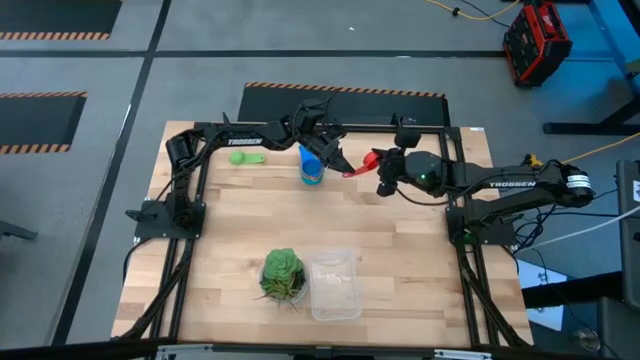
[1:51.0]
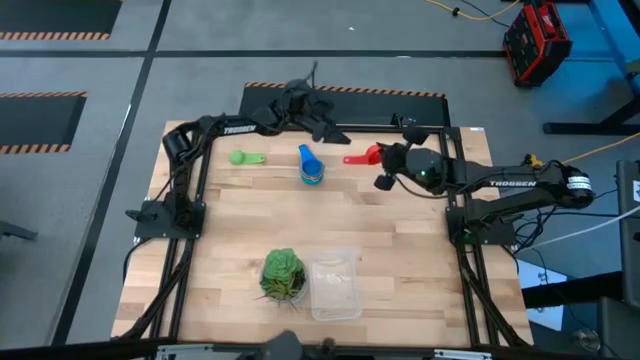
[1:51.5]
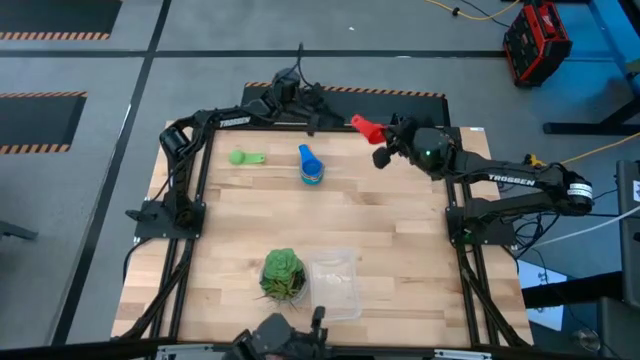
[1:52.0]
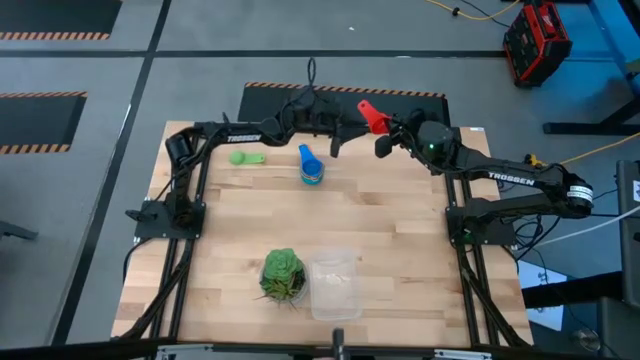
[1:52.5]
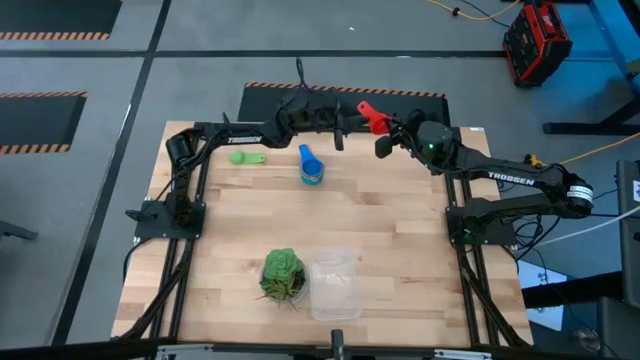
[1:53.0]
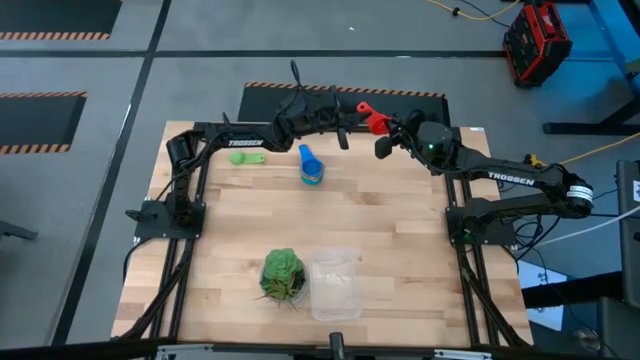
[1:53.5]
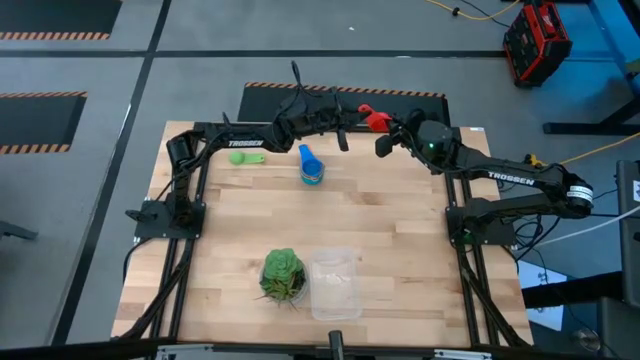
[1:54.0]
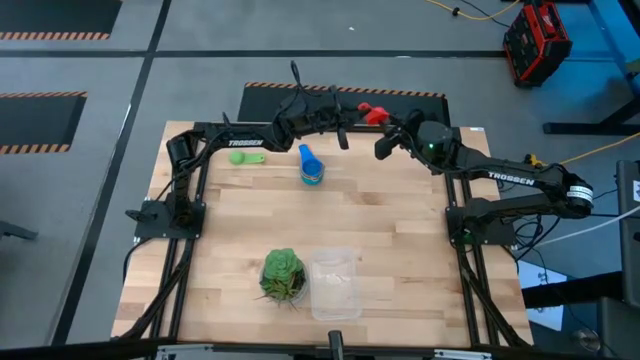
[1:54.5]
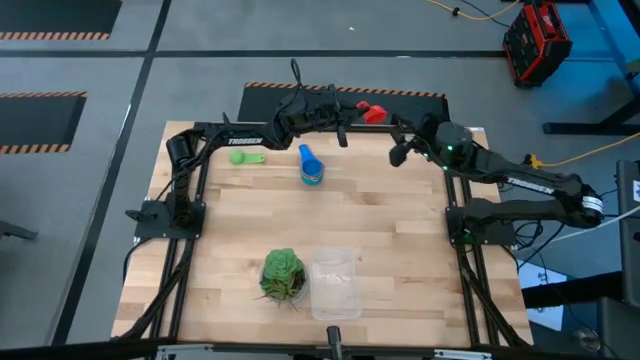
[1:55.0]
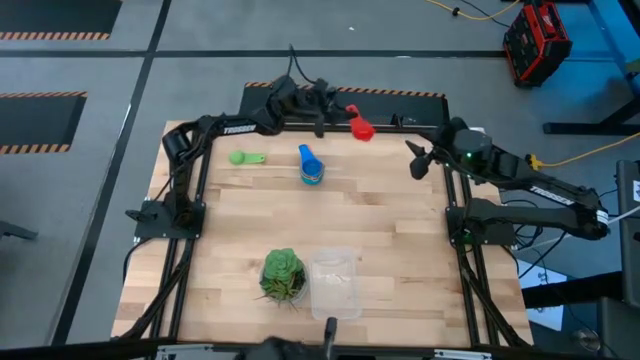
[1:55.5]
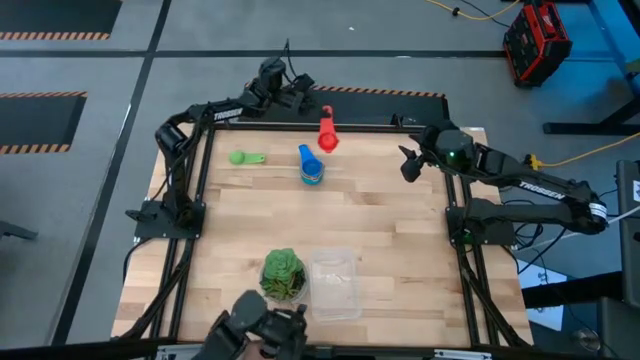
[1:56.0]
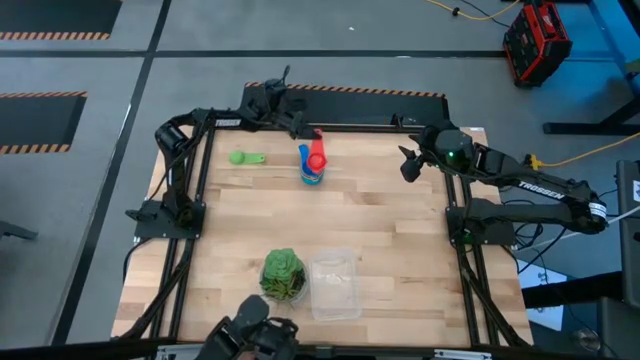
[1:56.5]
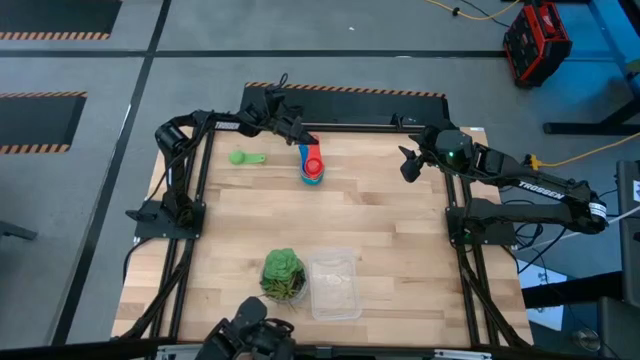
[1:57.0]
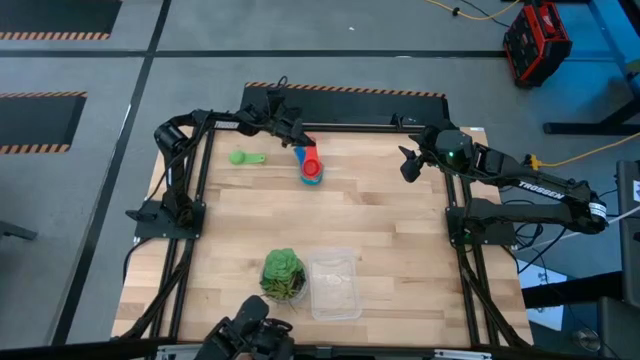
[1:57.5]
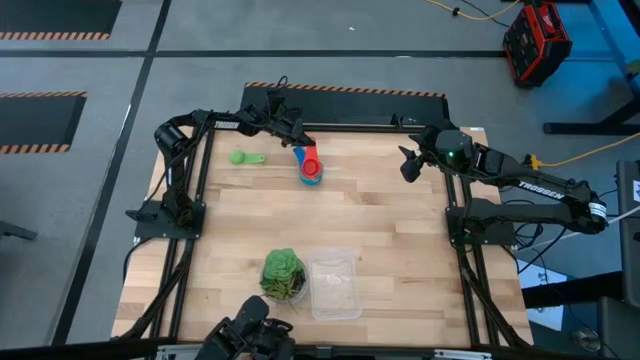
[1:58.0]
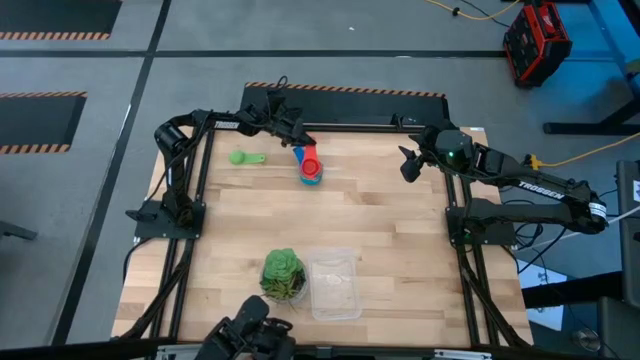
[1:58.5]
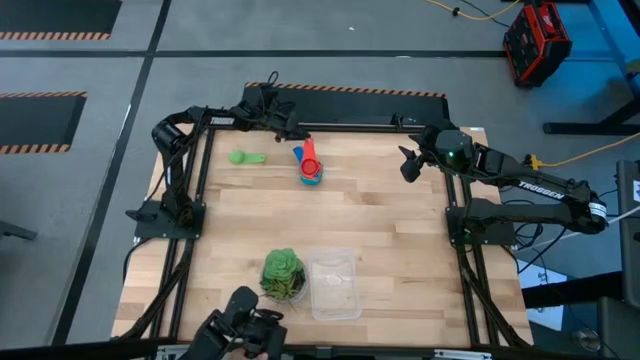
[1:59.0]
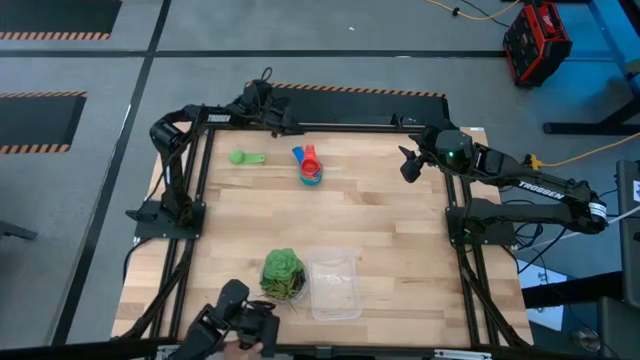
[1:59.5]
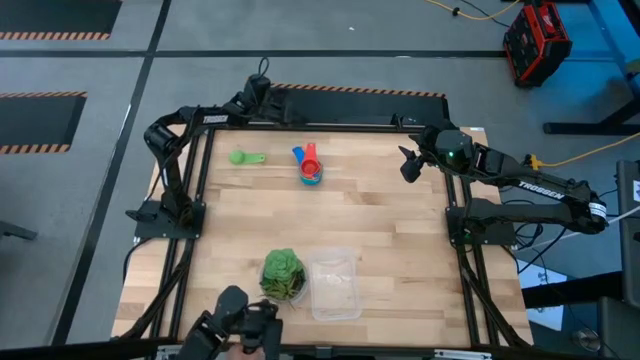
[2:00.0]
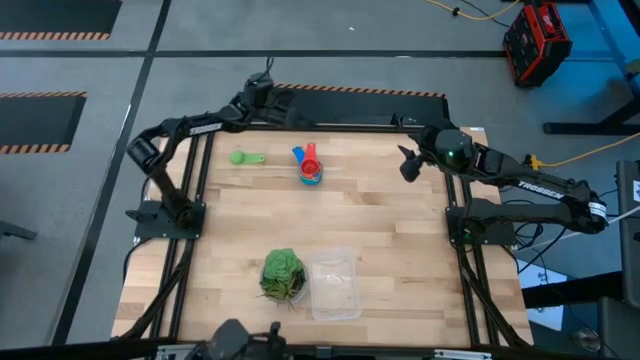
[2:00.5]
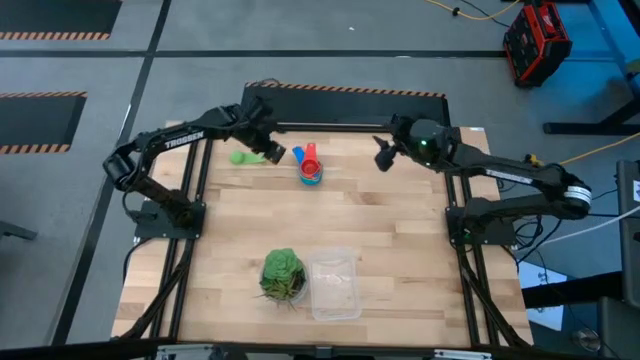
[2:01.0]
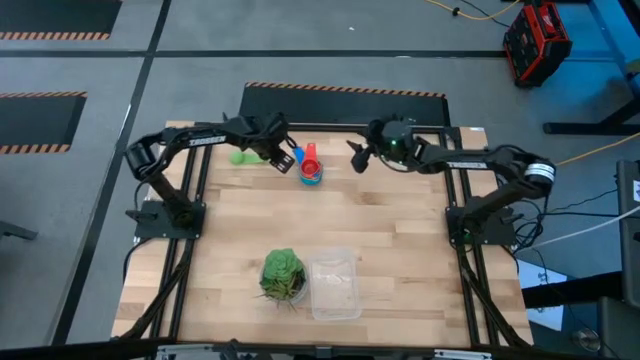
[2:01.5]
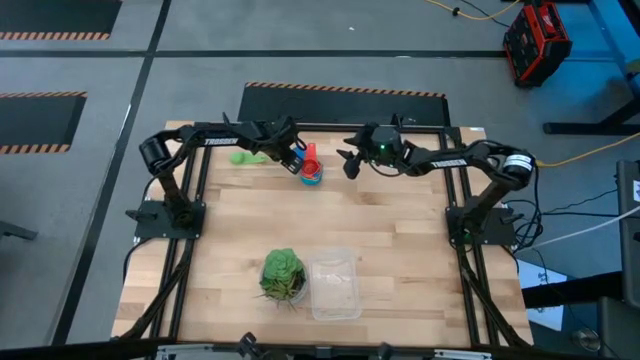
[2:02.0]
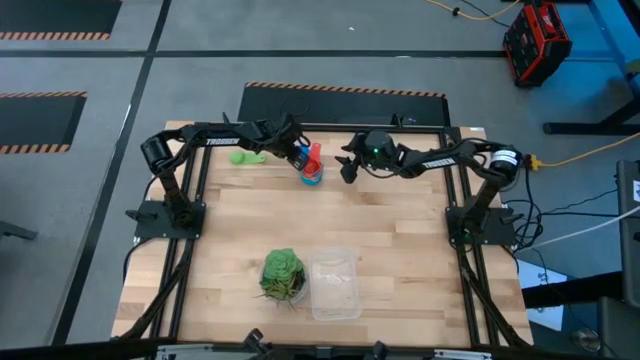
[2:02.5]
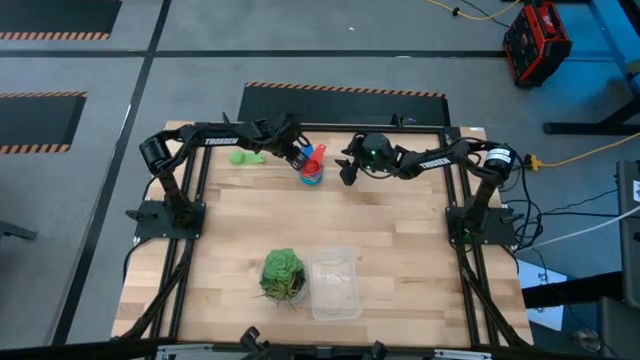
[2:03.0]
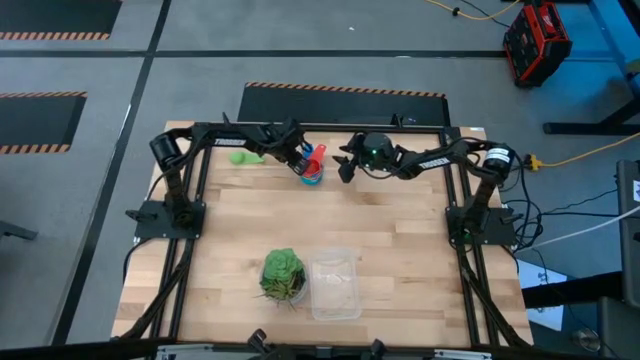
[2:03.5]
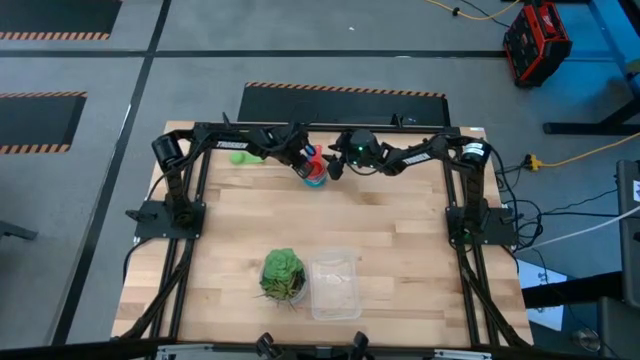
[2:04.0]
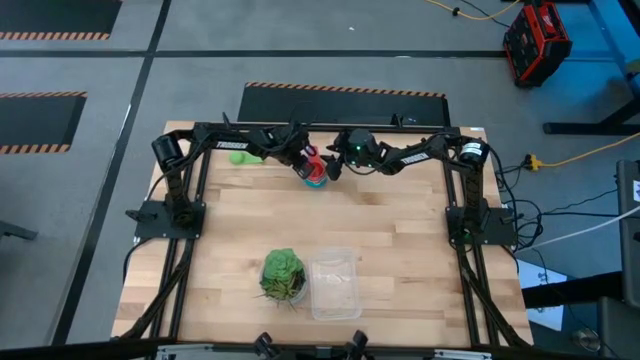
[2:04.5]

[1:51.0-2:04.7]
Task: Nest measuring cups in basket
Stack the red measuring cup on top of the blue measuring cup
